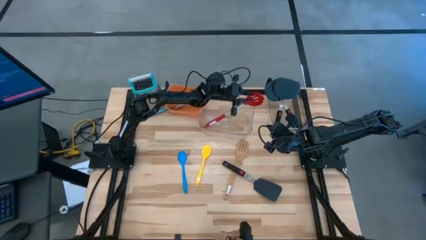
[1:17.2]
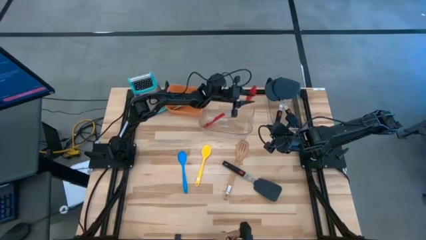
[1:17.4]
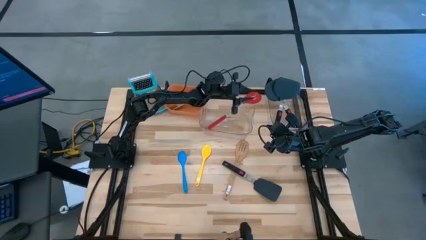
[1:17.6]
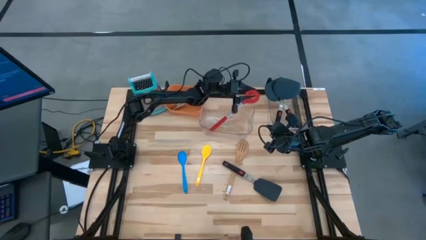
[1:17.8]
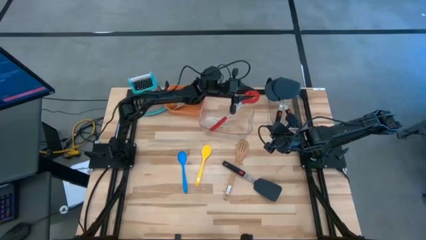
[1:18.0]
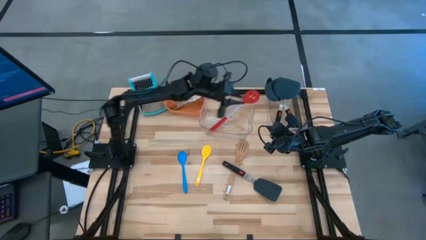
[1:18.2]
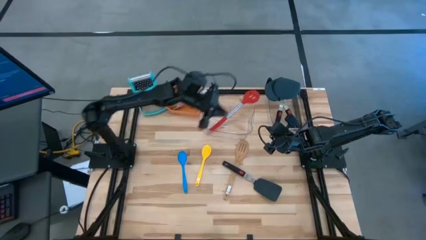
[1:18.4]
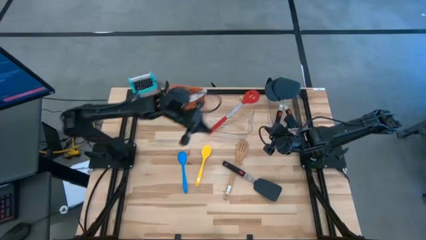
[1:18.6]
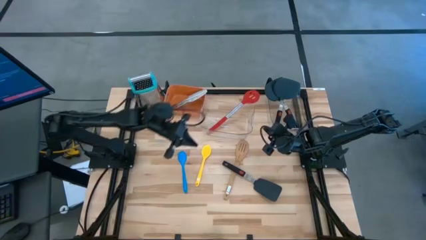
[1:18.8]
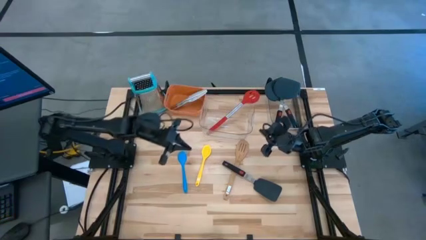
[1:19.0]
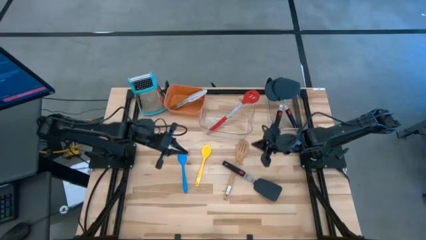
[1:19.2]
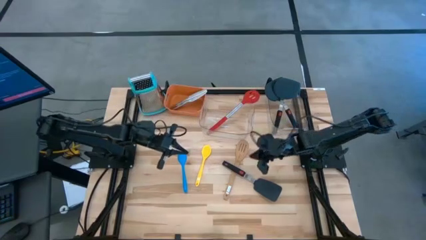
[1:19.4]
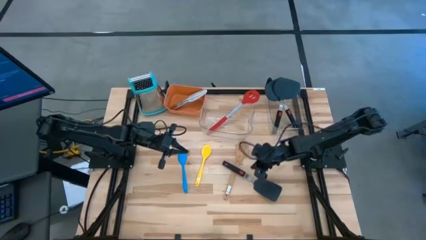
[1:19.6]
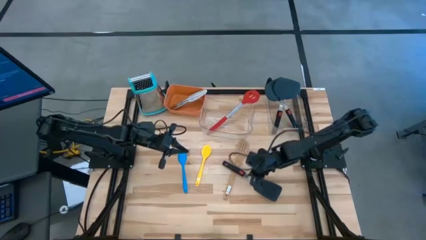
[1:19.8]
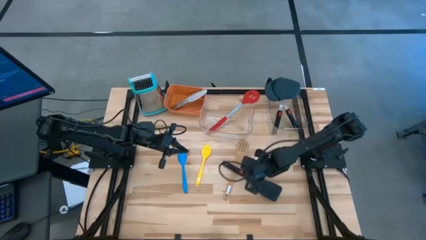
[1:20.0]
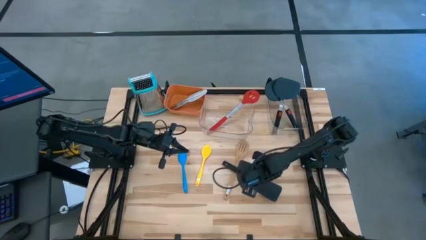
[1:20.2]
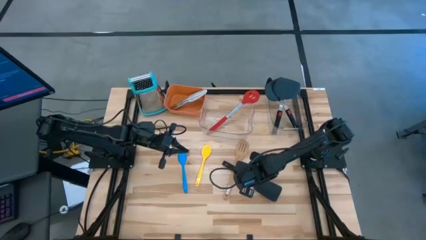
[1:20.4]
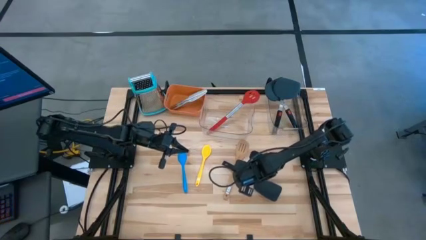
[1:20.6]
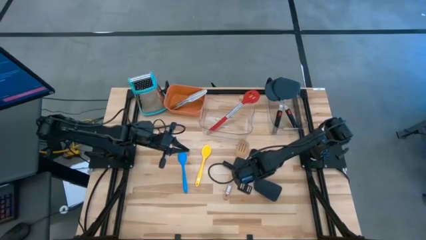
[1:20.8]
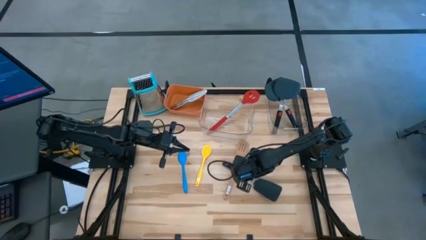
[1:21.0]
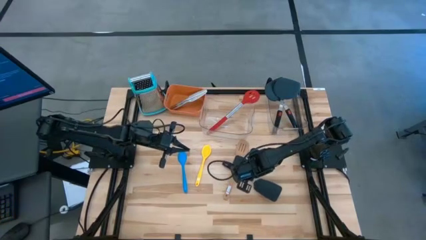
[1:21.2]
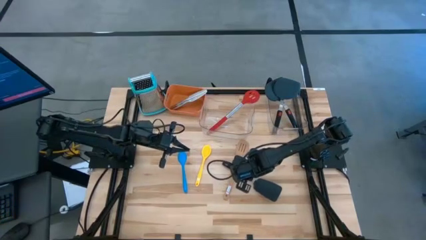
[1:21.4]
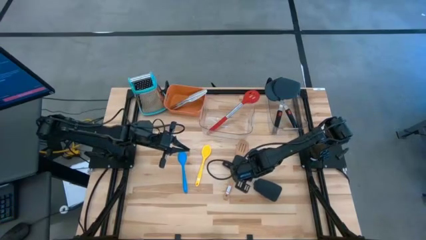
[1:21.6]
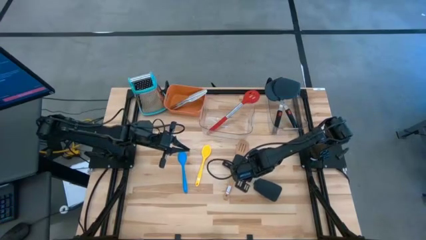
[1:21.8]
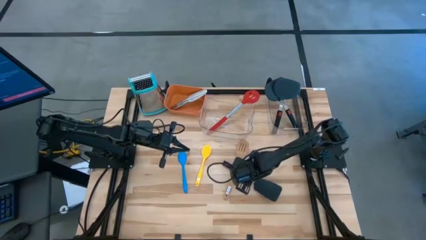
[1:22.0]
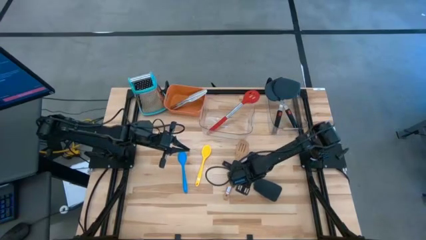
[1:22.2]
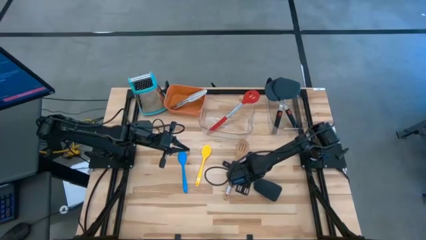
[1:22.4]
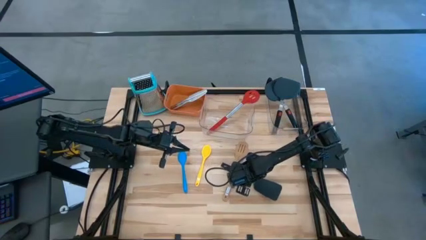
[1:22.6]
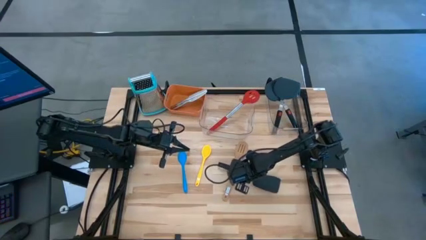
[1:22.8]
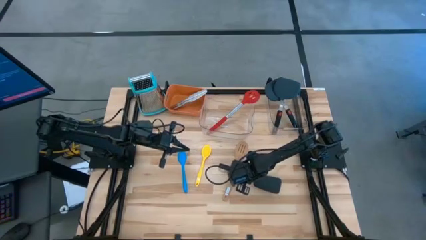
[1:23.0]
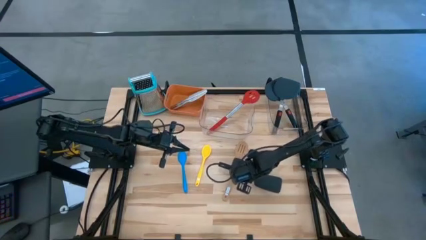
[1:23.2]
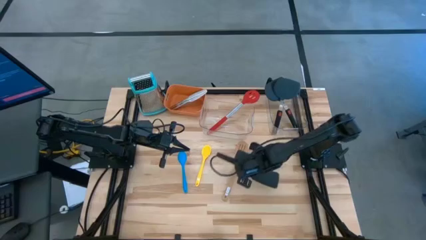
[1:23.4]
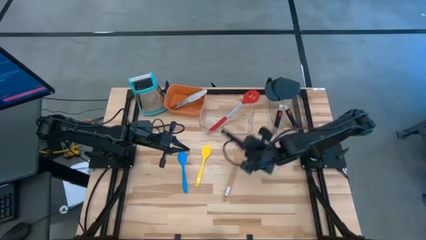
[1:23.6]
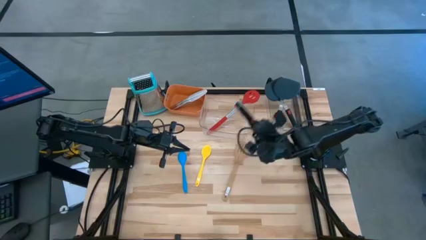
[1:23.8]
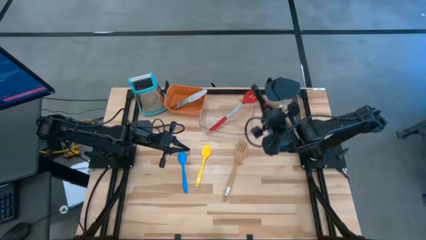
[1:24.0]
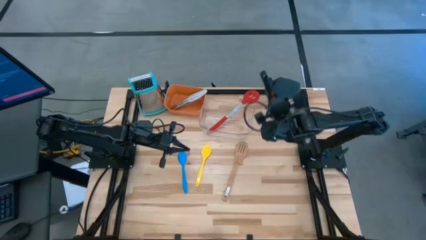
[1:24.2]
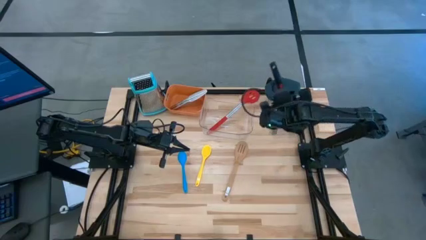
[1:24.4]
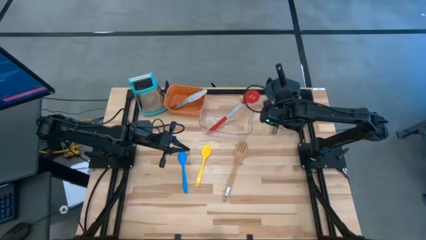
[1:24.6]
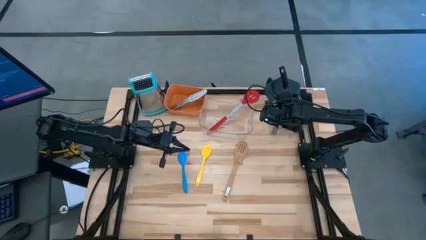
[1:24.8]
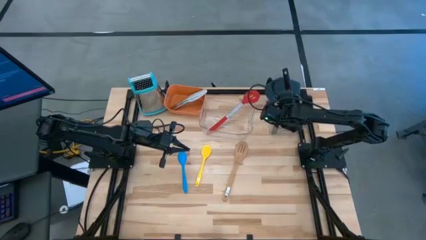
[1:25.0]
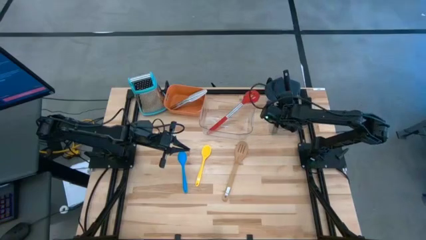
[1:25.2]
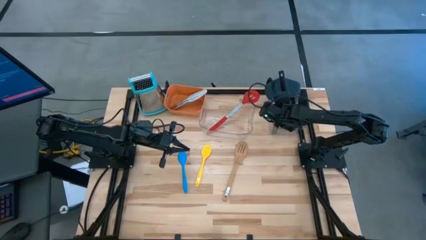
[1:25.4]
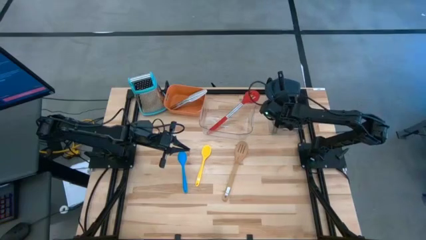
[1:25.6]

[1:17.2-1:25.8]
Task: Pick & Place Kitchen Items
Put the black spatula into the right transparent bin

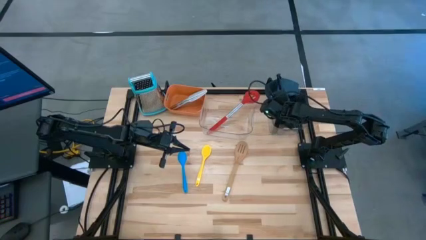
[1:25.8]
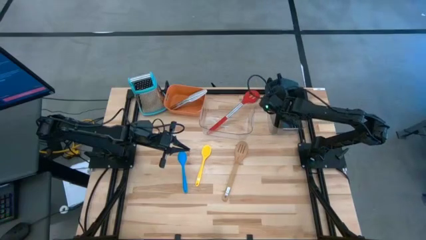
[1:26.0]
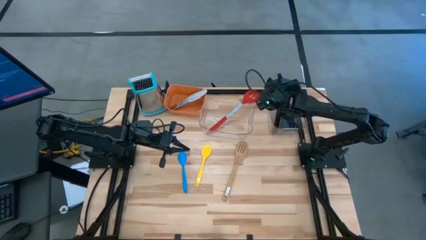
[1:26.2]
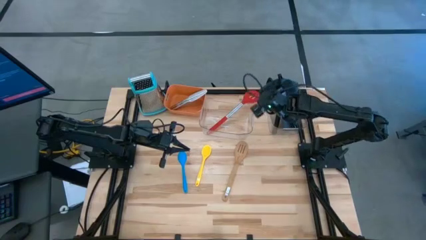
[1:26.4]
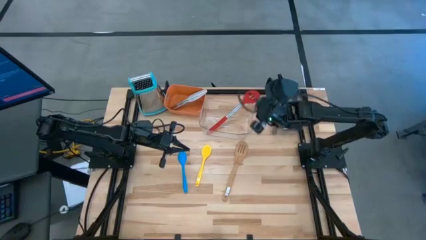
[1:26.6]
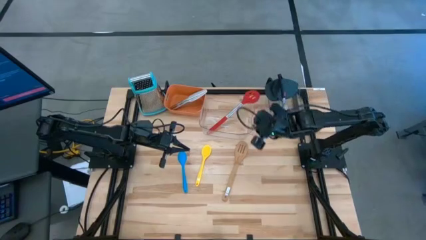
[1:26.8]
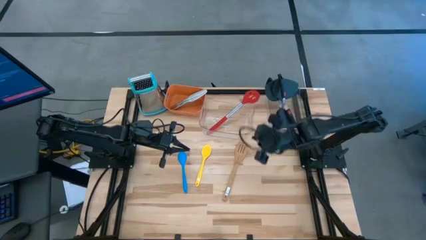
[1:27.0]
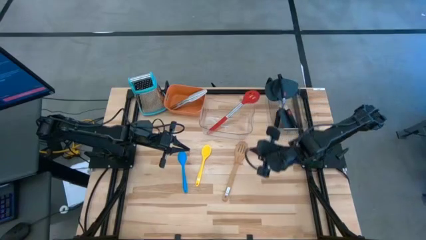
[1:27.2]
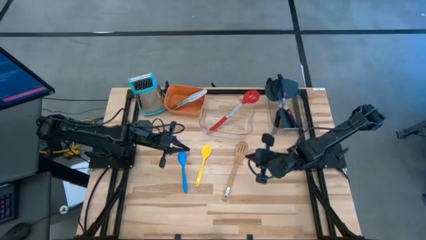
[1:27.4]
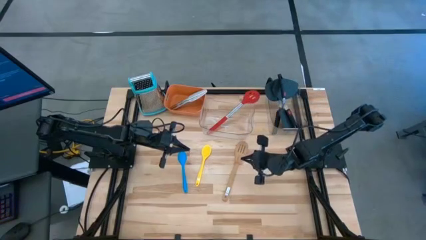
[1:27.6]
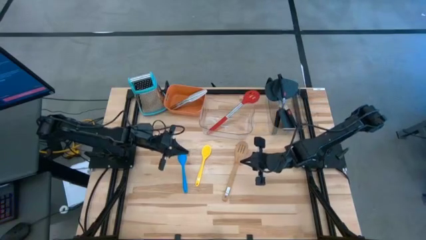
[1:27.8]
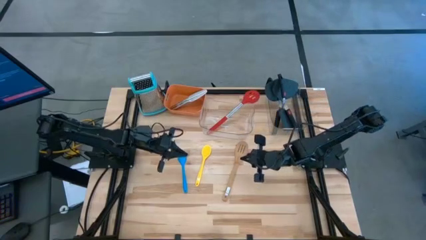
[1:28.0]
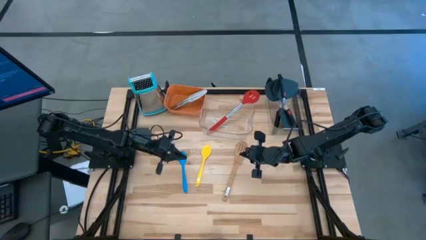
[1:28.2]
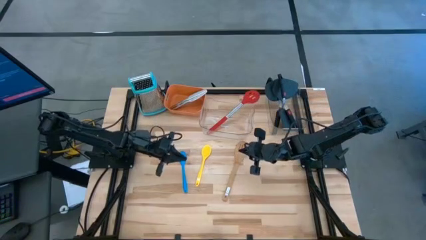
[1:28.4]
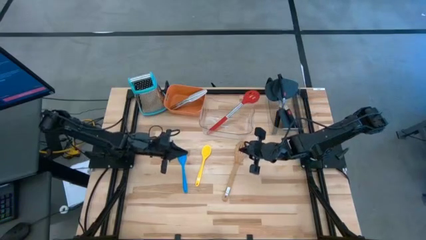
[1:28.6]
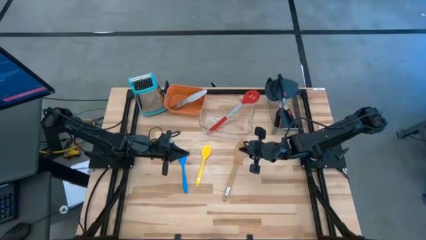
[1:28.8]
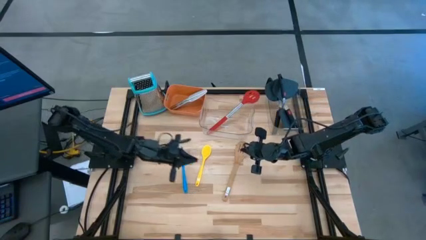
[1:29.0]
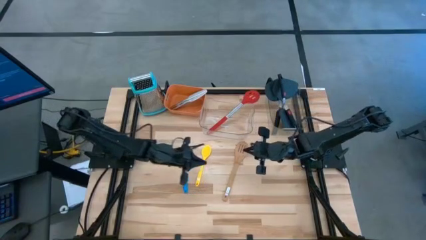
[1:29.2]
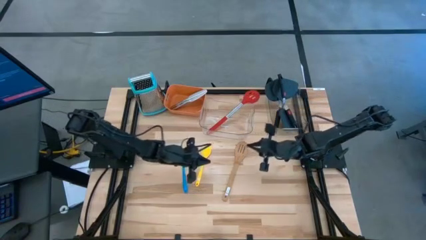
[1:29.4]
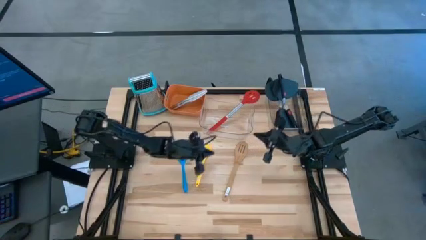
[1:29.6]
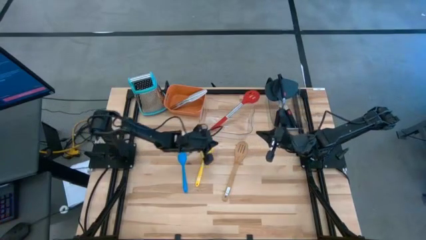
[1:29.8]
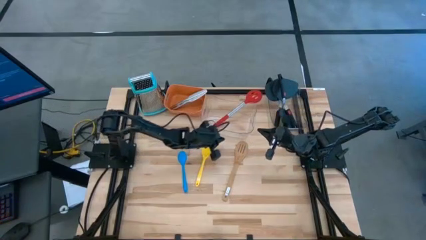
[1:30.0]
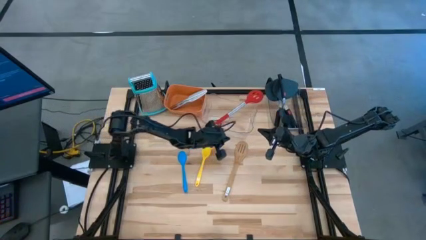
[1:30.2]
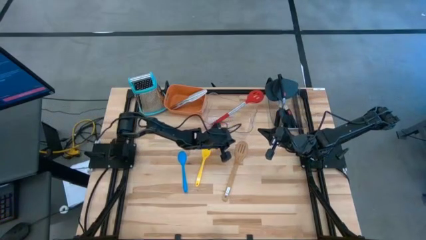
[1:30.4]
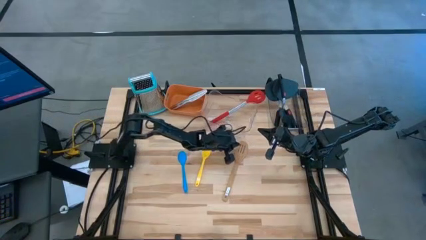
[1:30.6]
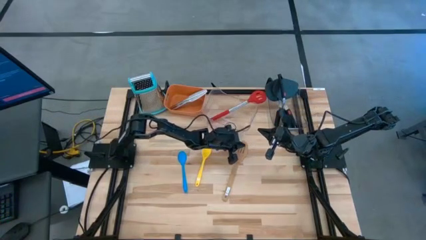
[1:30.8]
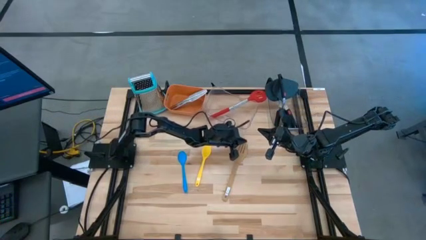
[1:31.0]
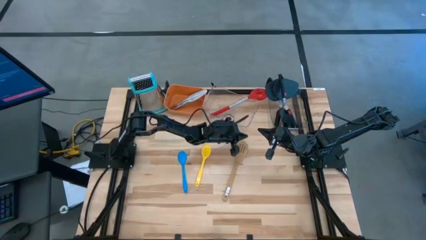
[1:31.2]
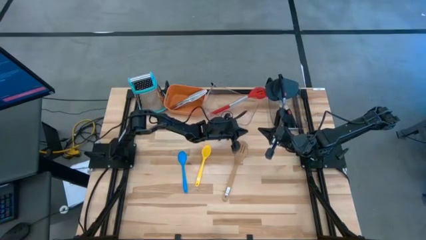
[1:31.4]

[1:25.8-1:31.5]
Adjust the left transparent bin on the table

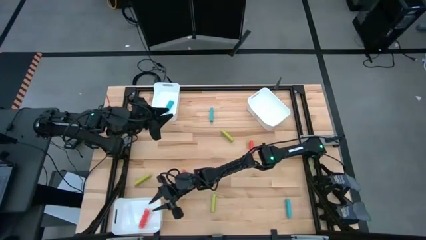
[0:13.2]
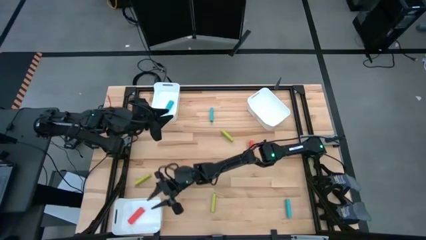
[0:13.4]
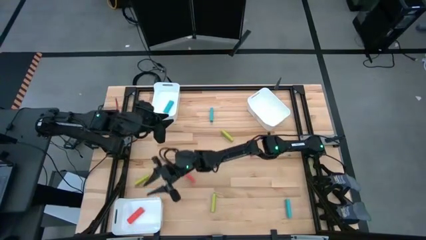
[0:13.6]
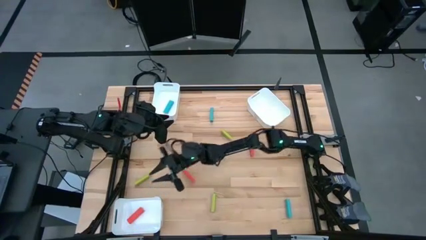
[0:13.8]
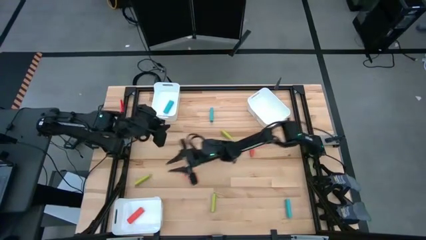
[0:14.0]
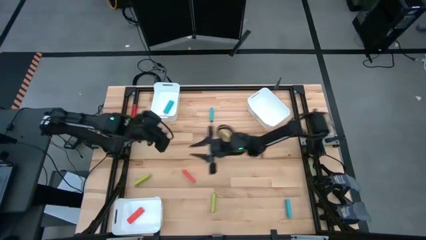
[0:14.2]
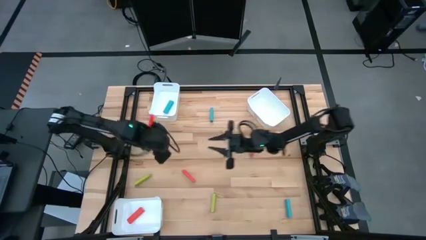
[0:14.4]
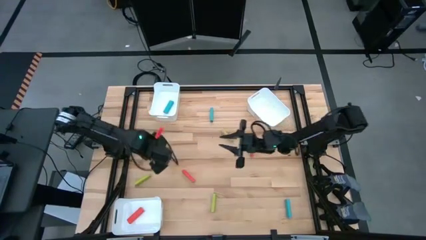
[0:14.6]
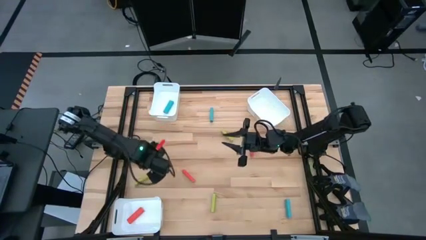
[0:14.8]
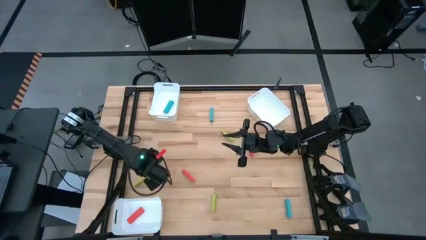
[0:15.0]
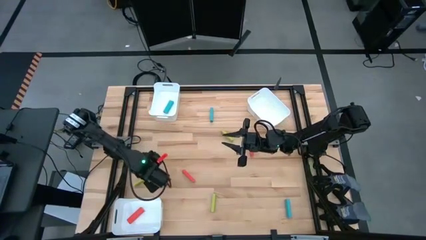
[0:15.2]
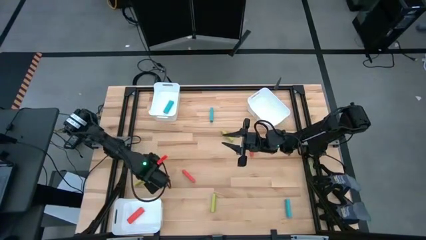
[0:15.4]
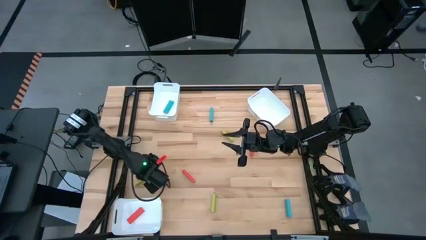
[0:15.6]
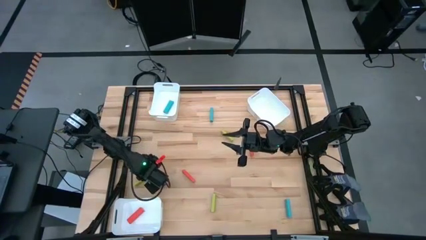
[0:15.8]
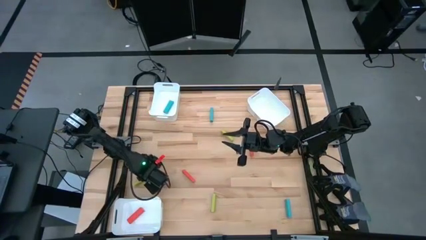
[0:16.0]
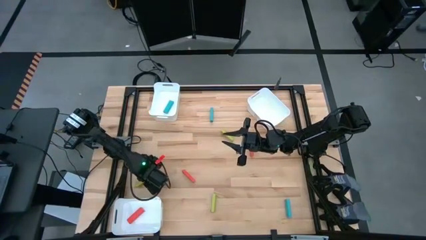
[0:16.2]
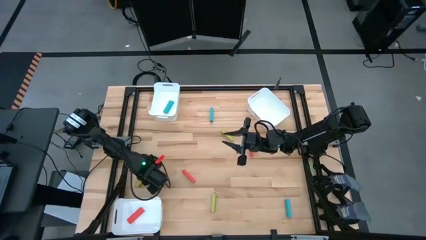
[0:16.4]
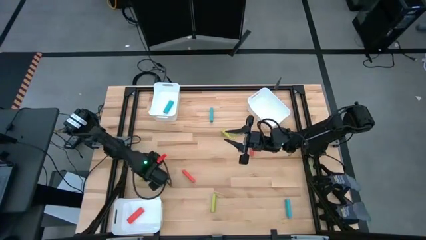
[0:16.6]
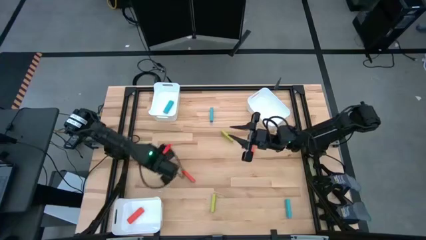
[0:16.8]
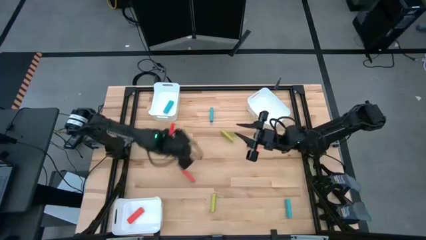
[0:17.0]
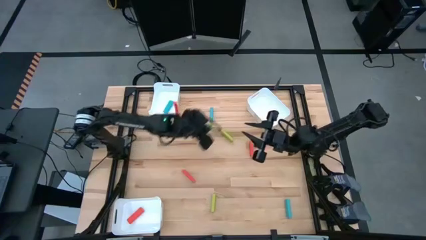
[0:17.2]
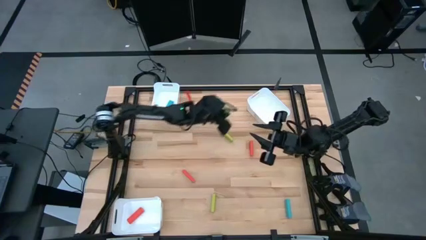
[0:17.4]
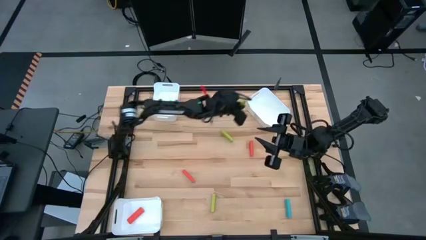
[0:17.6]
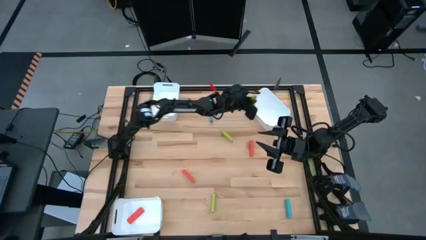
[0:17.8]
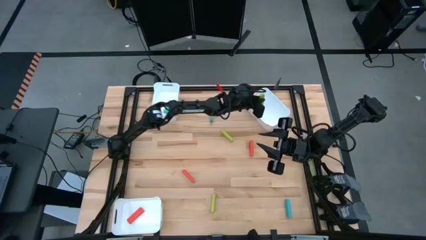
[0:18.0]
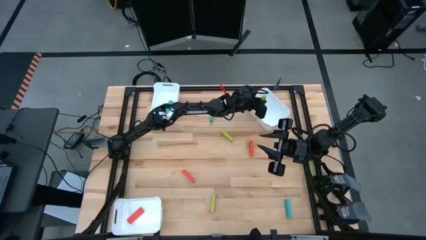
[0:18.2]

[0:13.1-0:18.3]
Task: Sort blocks
Put the middle left green block into the top right white bin
